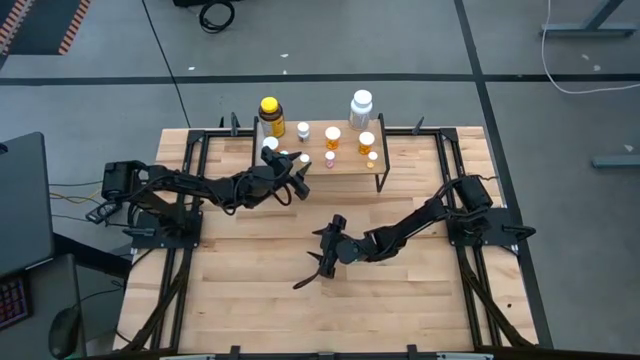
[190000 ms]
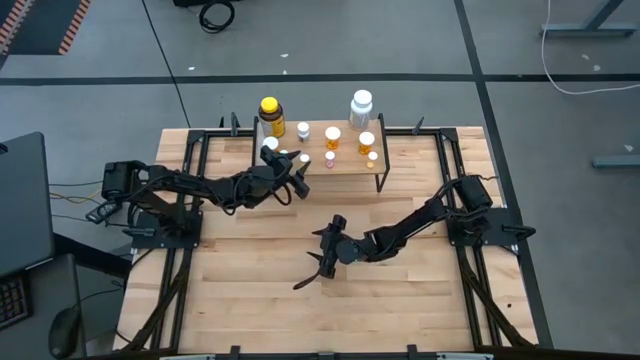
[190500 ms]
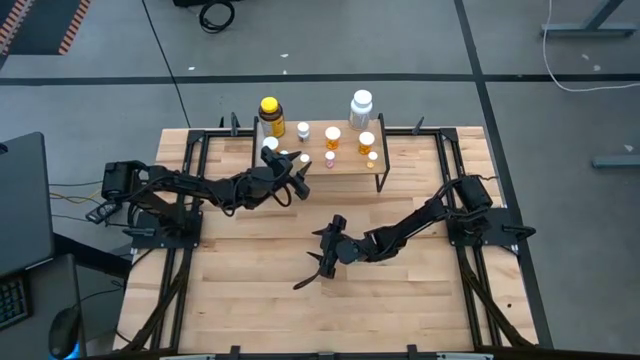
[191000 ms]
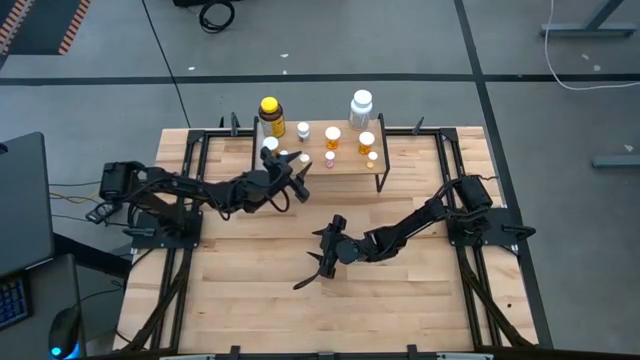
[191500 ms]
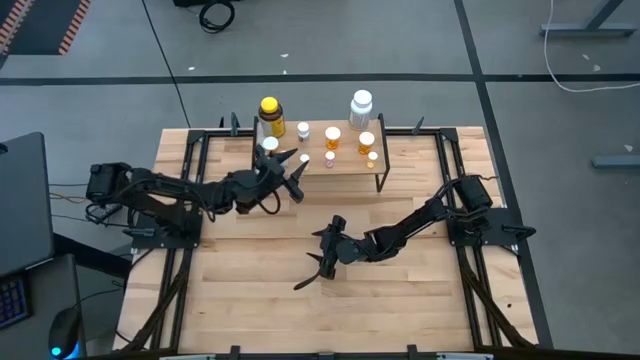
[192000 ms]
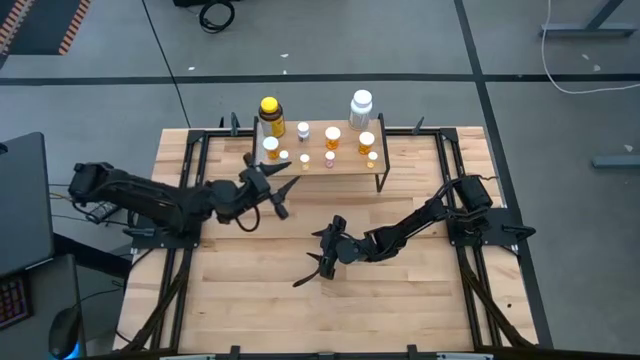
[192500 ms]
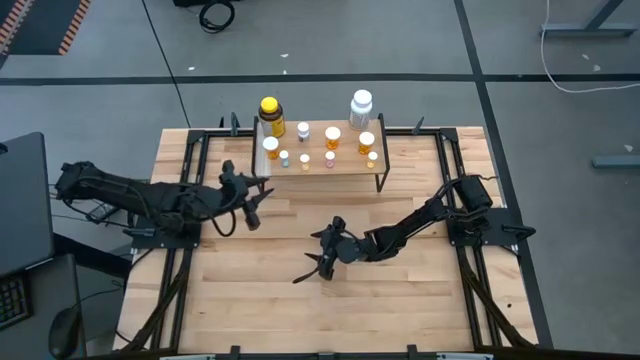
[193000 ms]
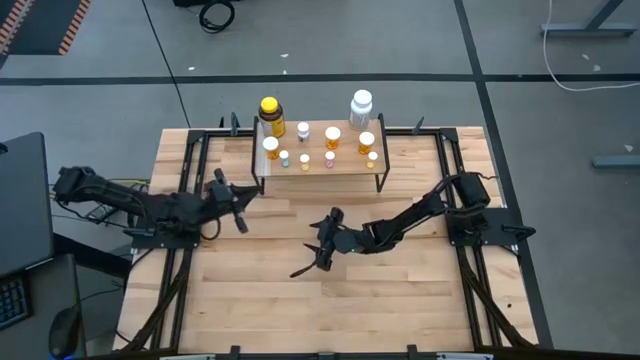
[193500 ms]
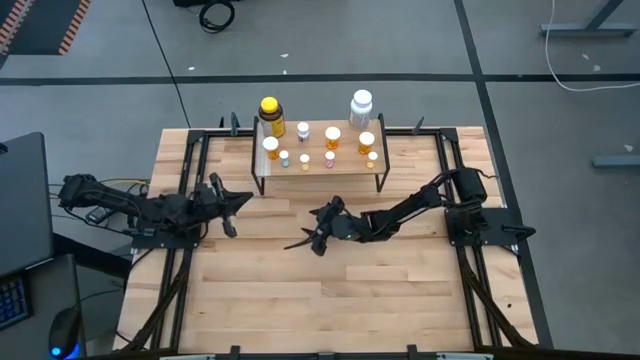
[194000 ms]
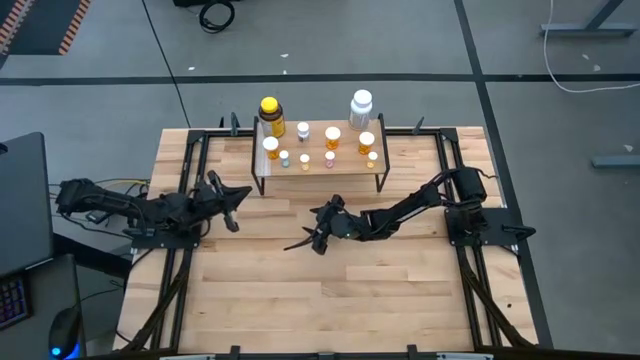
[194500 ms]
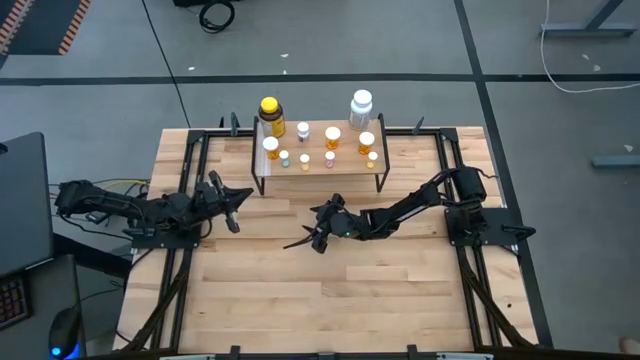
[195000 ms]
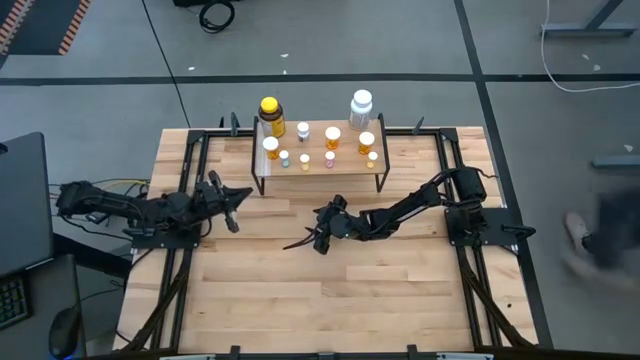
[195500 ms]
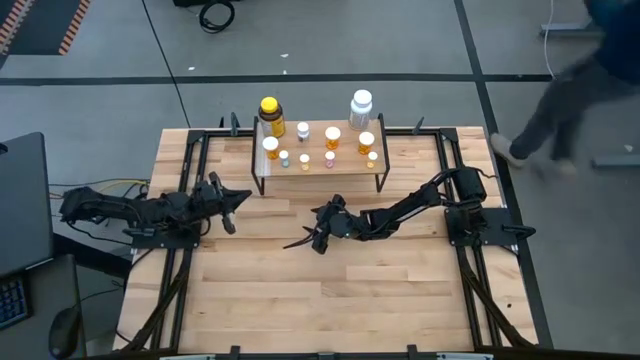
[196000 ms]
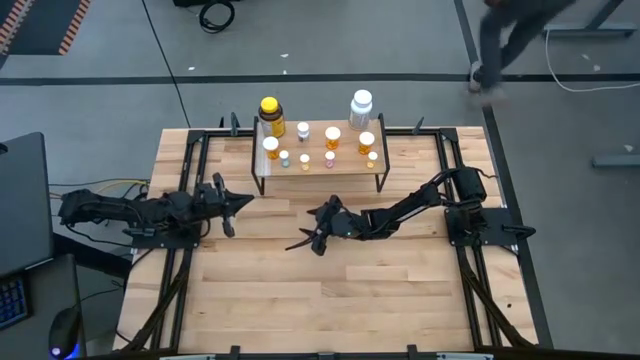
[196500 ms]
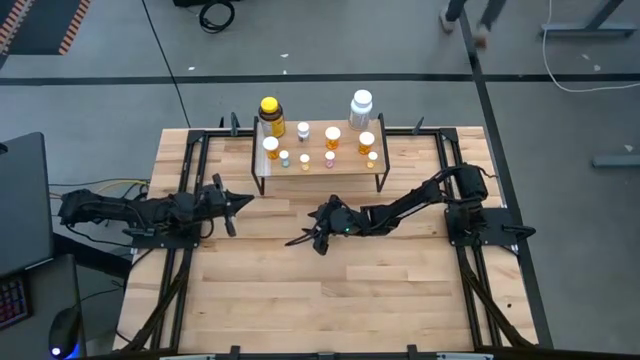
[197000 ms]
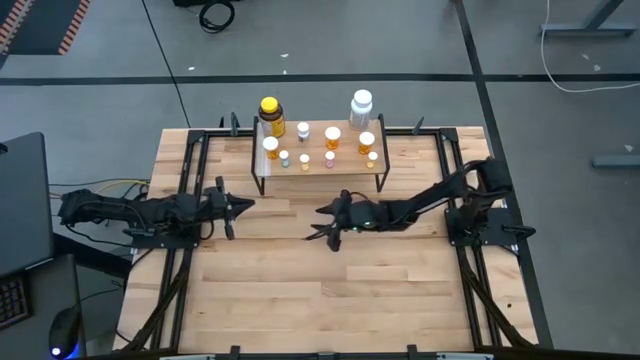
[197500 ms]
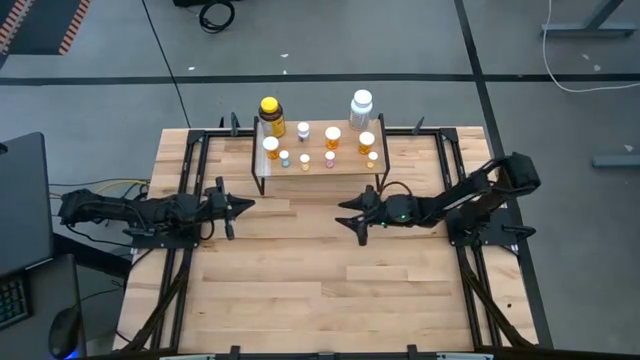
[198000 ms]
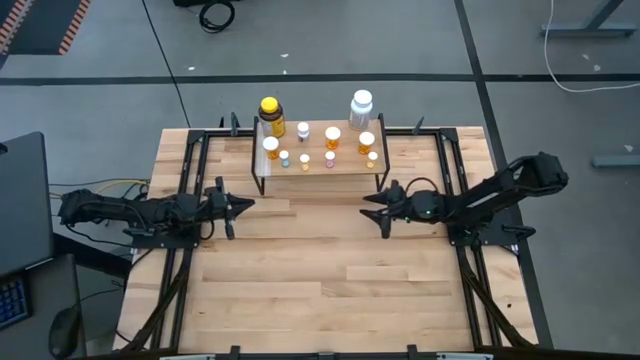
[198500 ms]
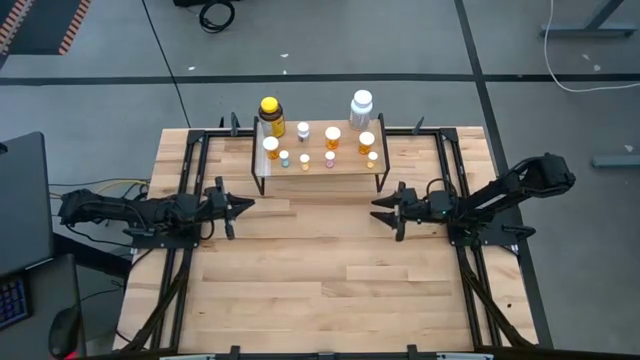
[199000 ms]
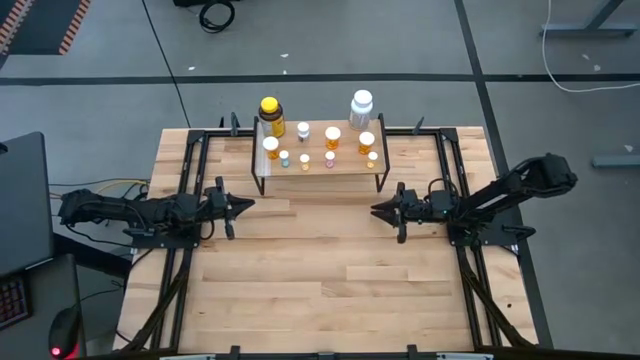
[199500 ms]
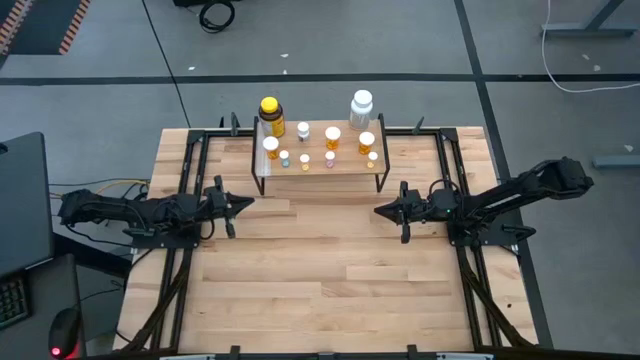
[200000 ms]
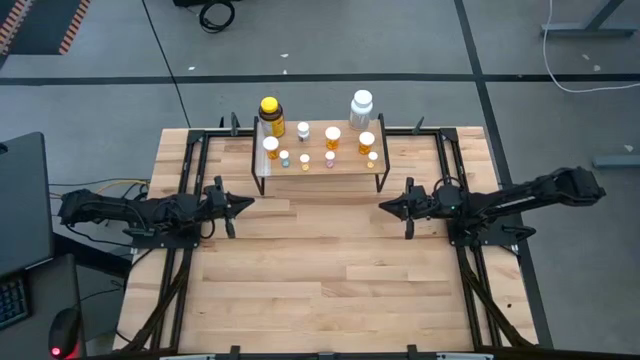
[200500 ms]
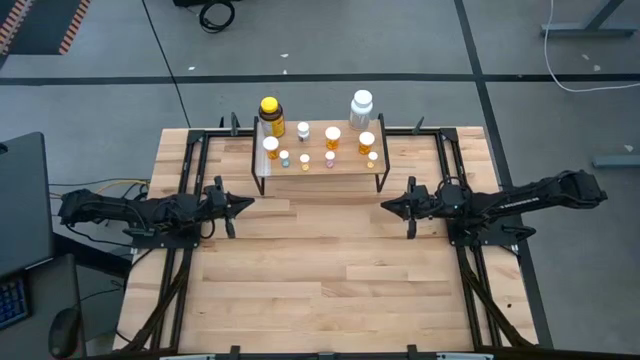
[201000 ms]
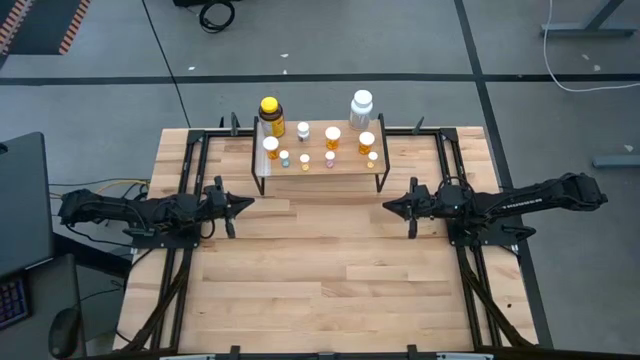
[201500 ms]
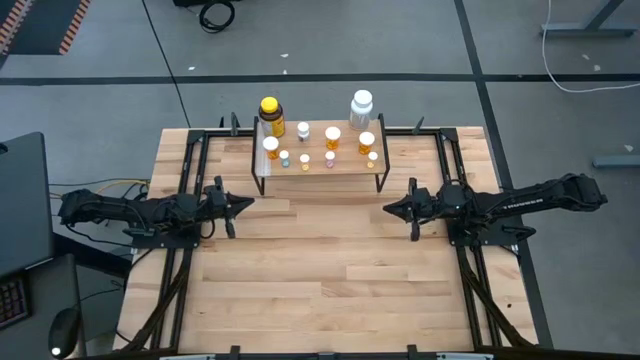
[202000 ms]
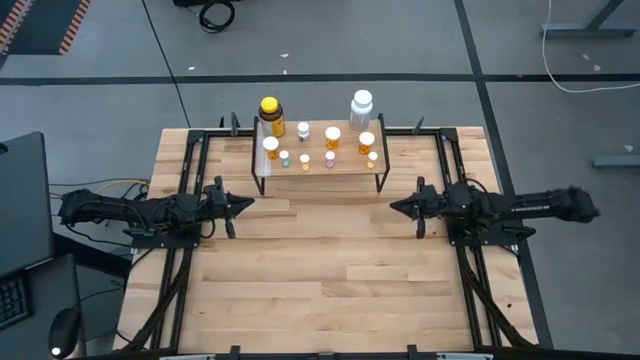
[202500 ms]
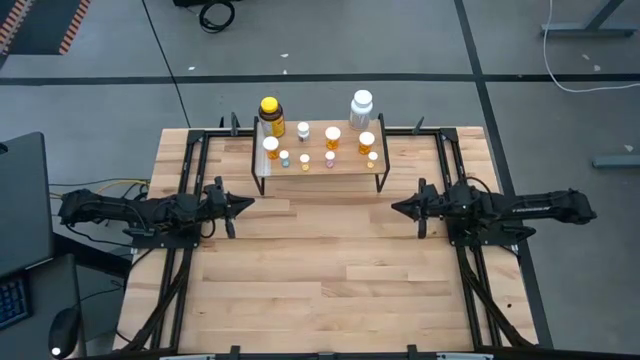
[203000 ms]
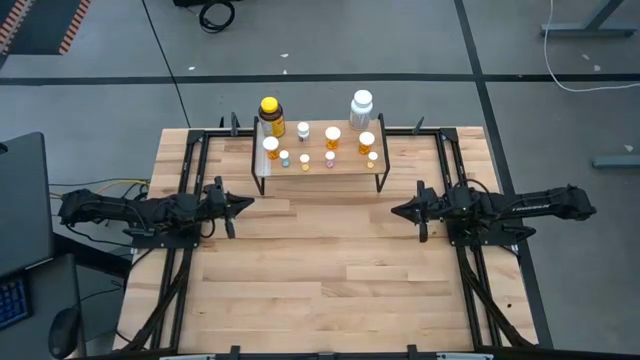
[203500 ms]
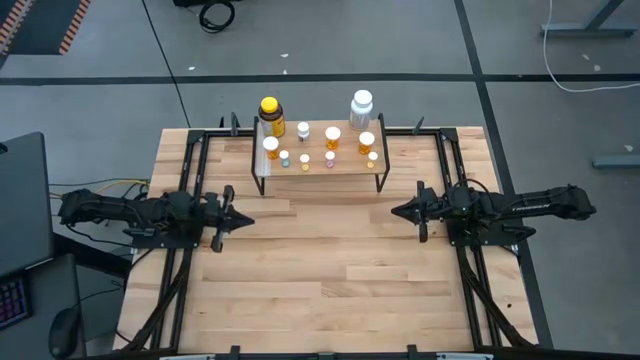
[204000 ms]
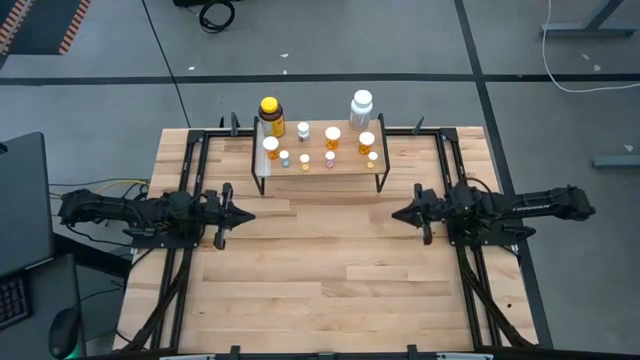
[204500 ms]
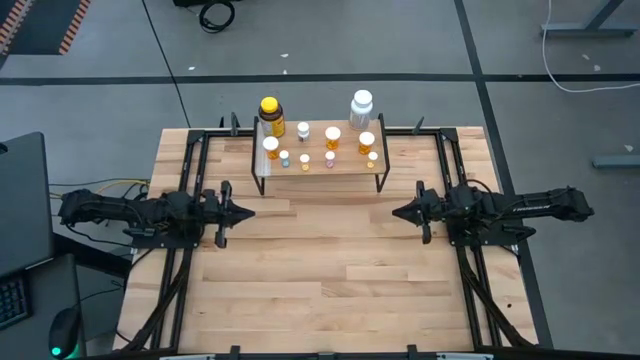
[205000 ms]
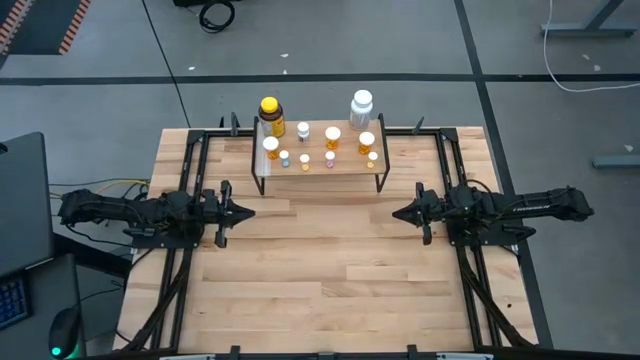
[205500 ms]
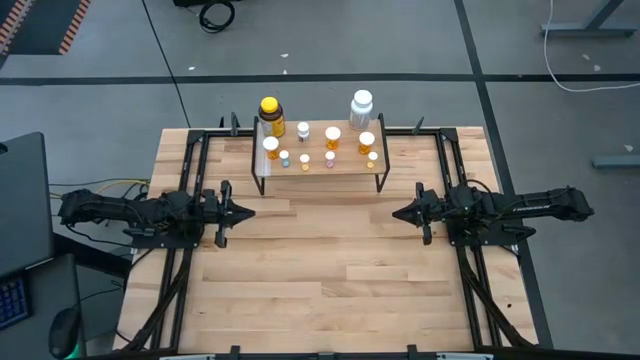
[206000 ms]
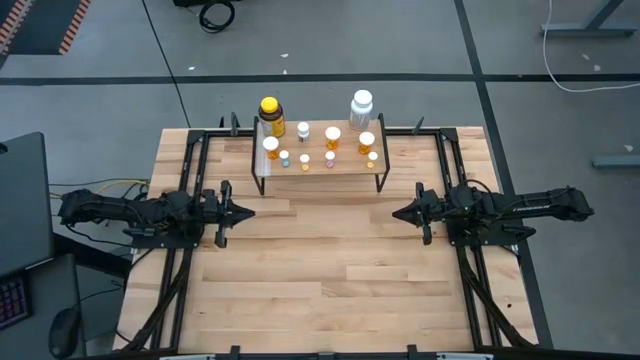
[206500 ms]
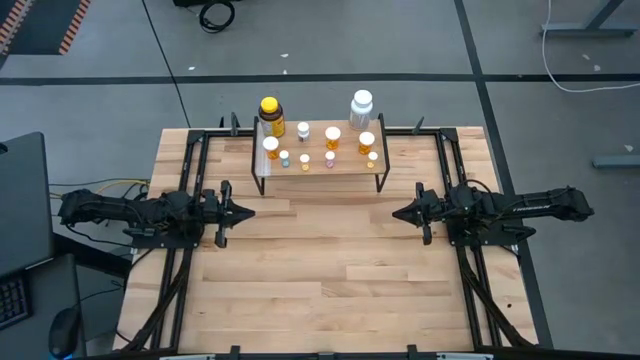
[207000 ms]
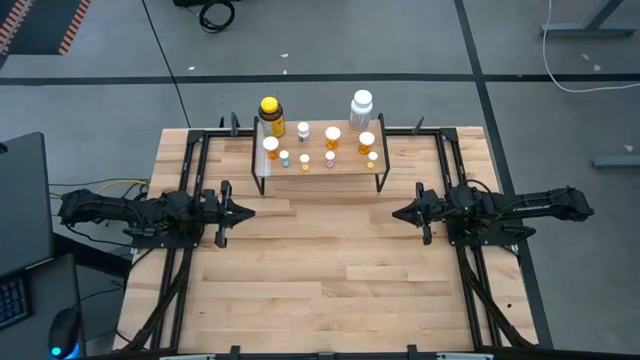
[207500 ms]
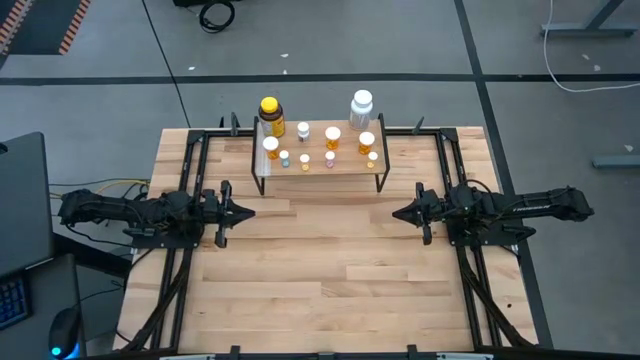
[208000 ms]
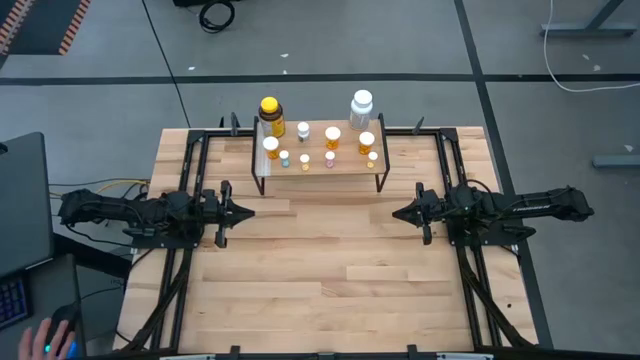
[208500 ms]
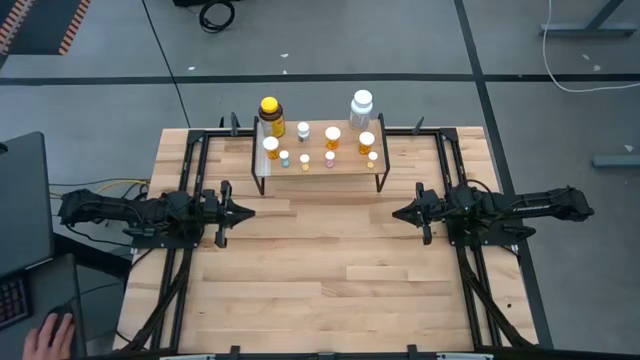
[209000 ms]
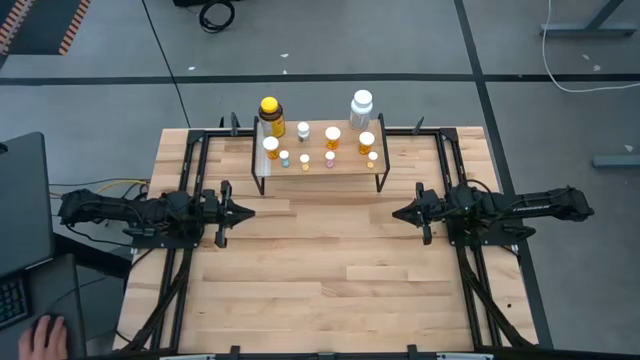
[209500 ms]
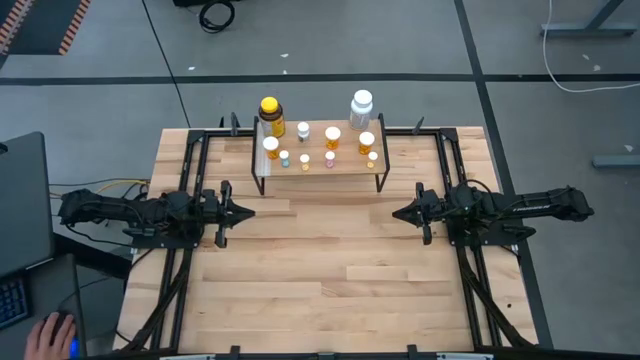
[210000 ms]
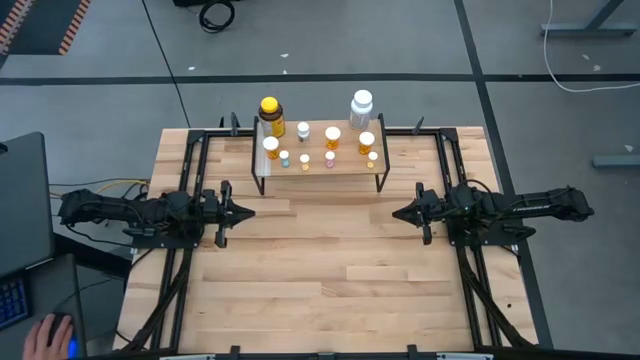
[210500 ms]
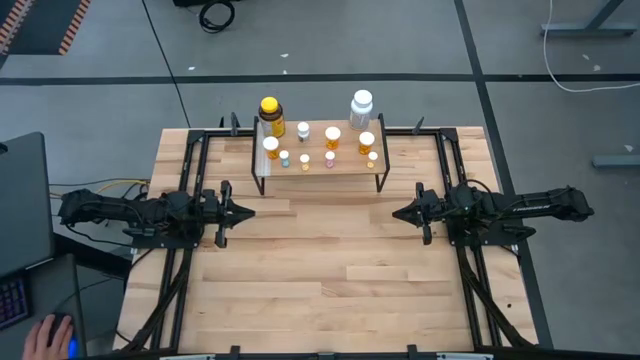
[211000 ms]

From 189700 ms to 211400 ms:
Task: Pick and place medicine bottles onto shelf by color
Return to Home Position
